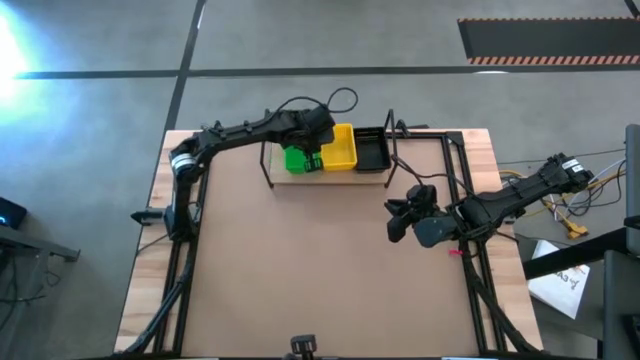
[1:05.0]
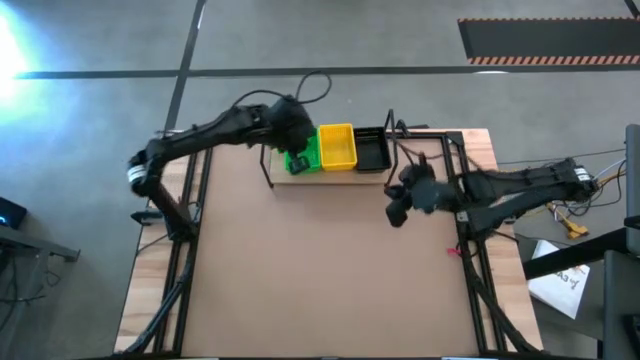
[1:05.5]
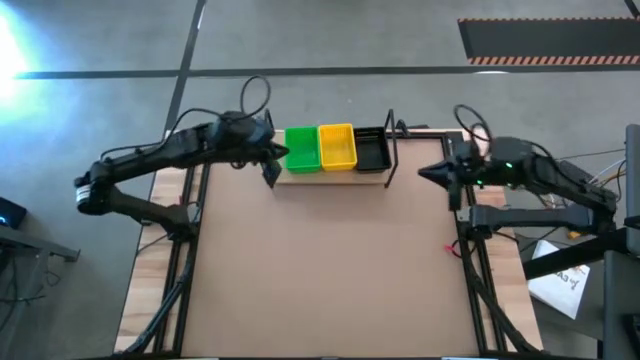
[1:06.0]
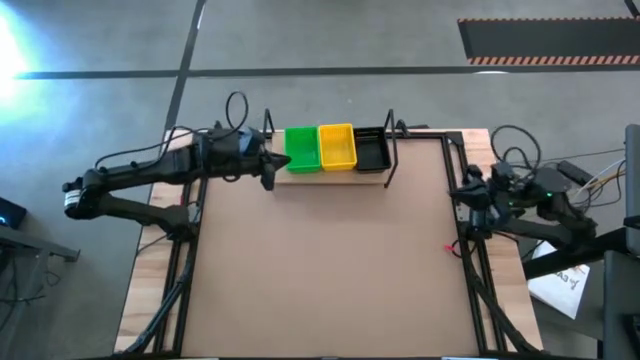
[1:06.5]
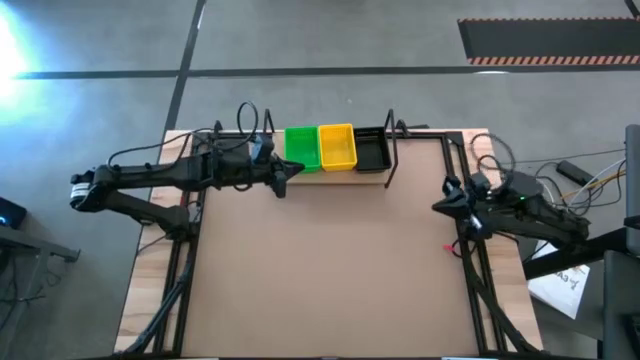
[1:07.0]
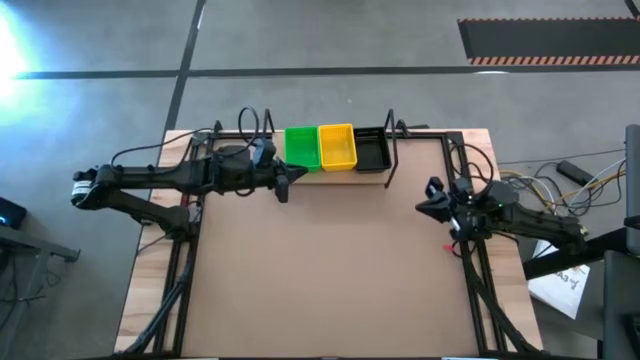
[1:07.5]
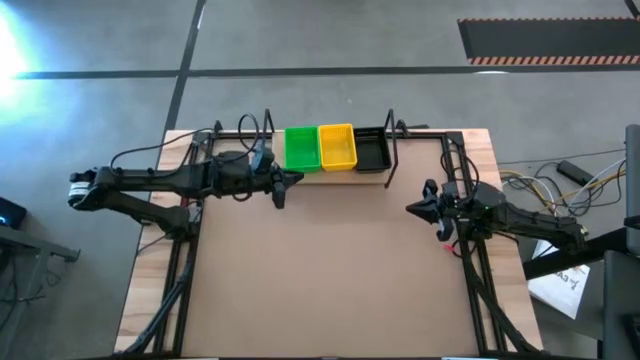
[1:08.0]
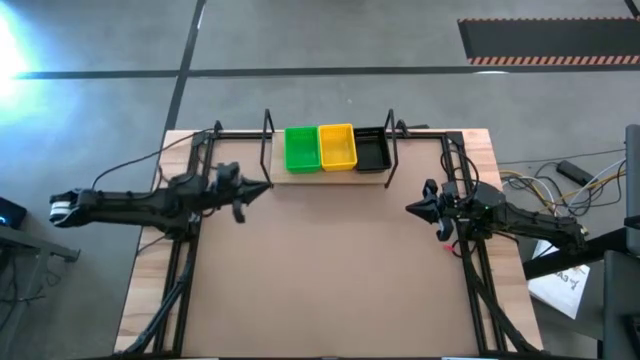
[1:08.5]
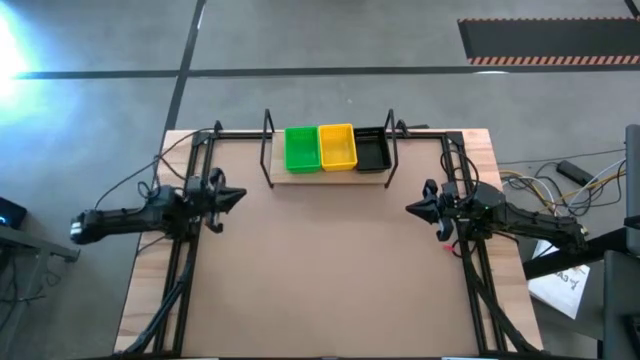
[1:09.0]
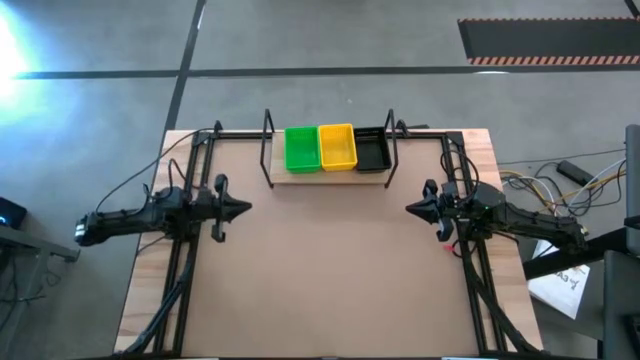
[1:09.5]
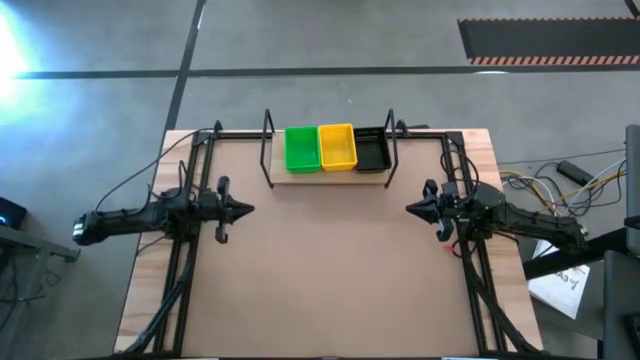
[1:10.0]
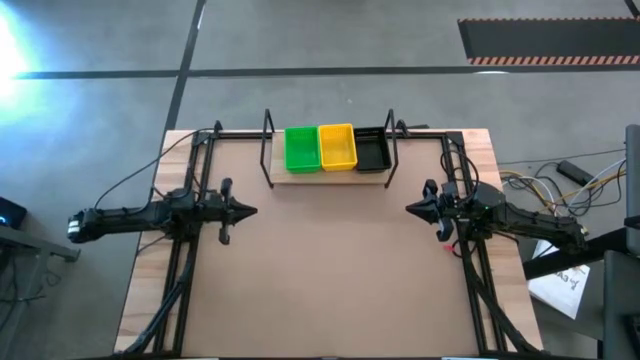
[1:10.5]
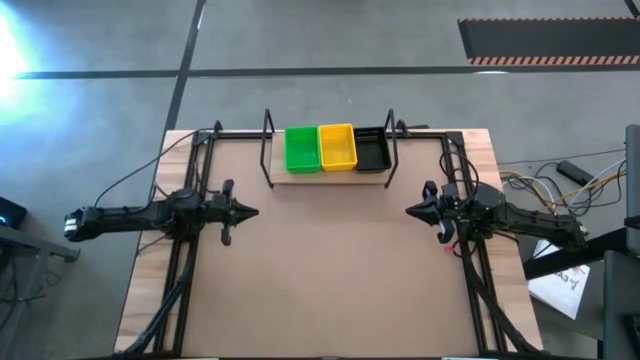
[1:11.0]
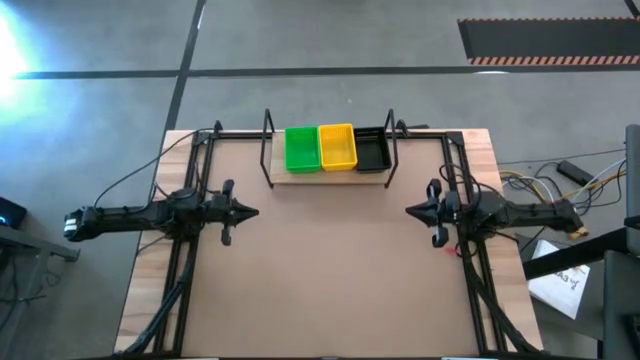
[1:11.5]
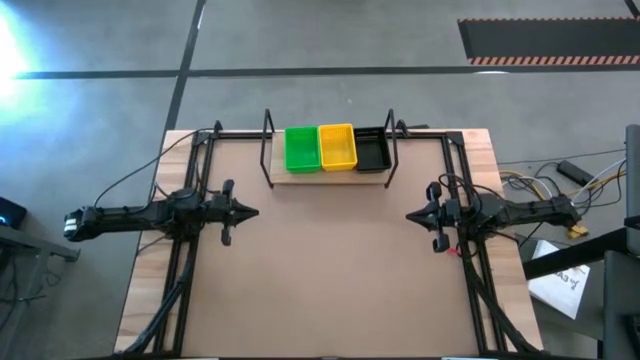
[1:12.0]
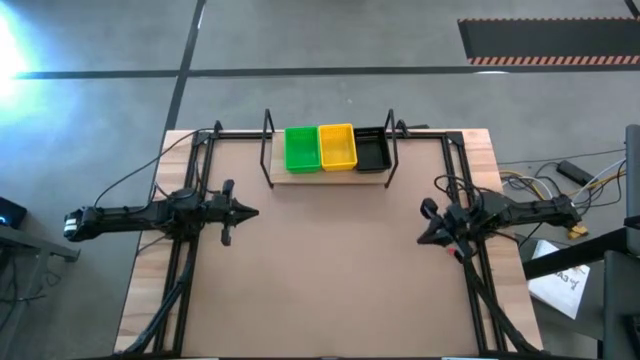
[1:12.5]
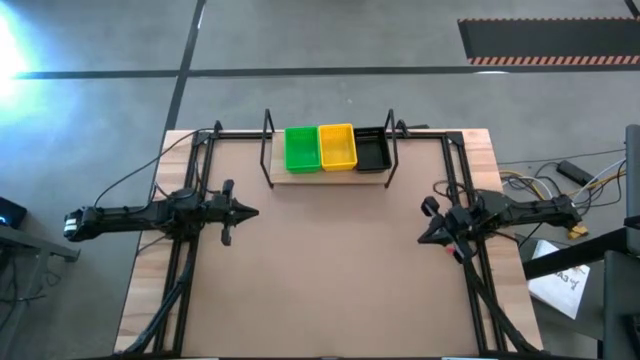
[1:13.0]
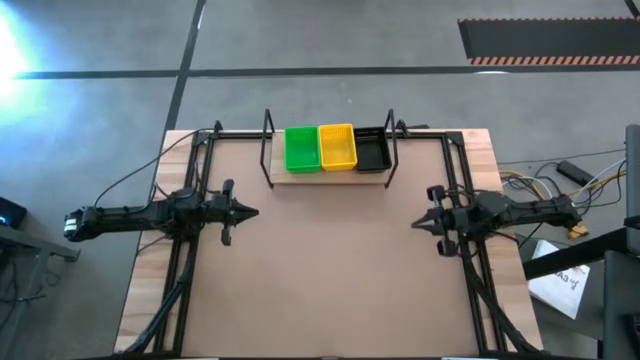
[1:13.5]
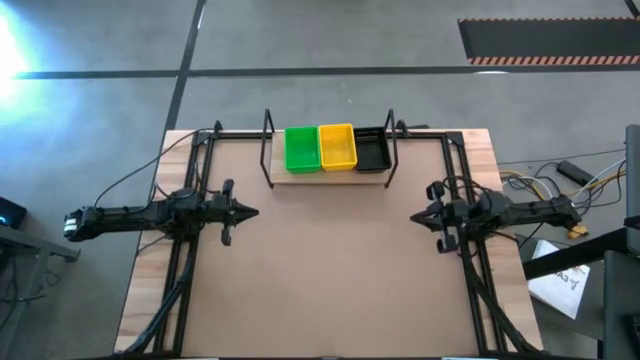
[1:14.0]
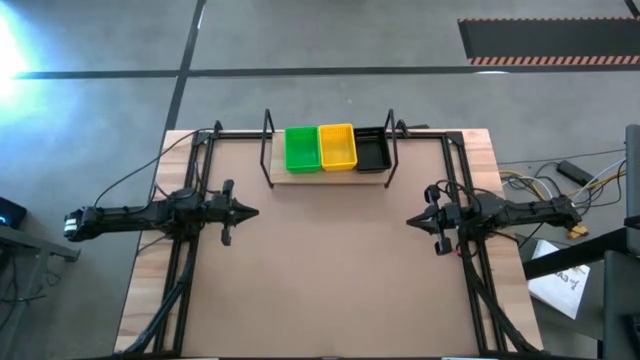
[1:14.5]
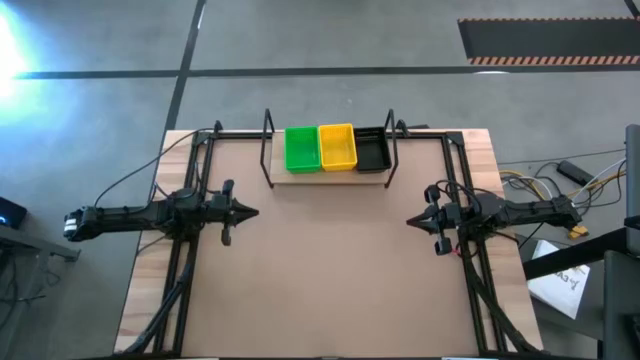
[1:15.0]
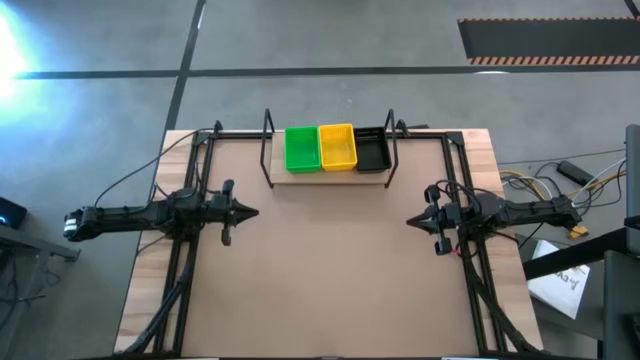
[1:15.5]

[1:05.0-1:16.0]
Task: Stack baskets on shelf by color
Return to Home Position

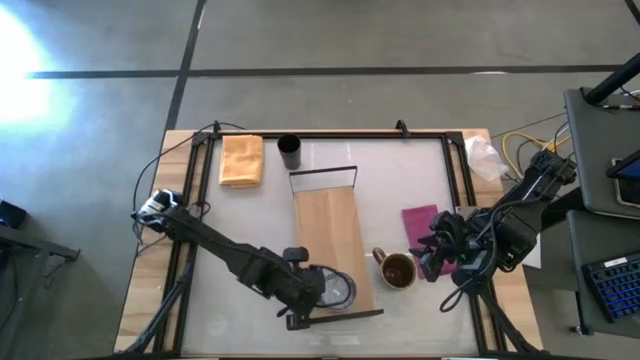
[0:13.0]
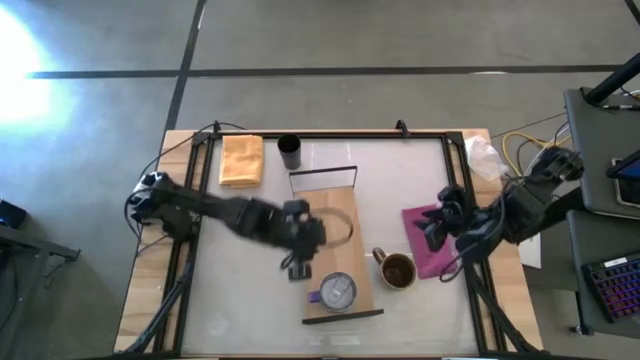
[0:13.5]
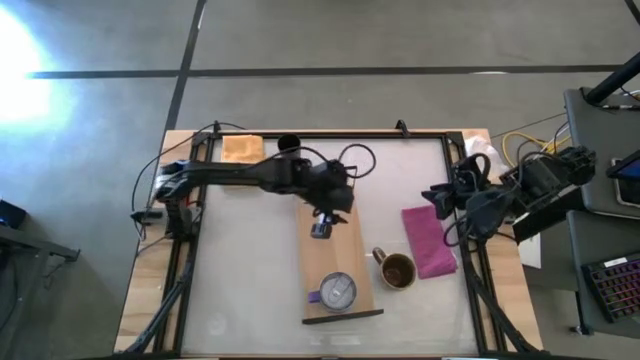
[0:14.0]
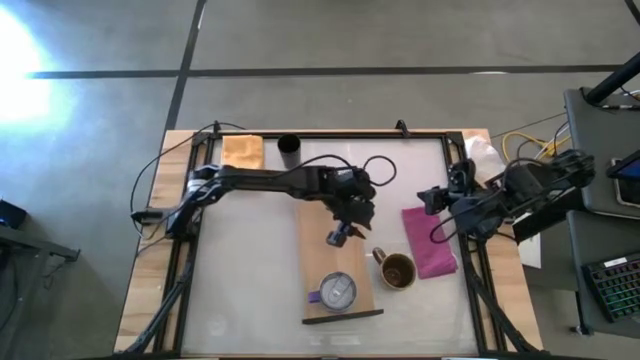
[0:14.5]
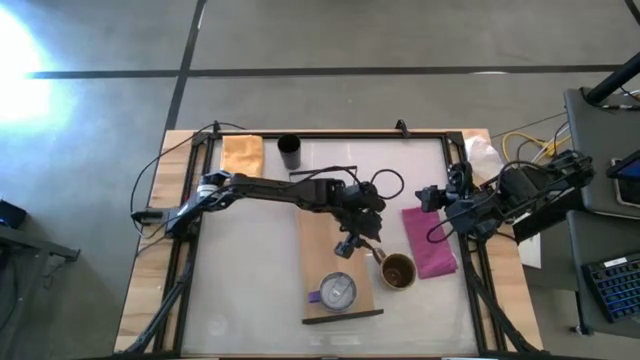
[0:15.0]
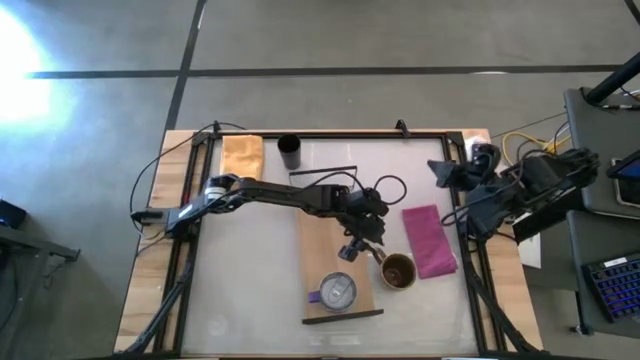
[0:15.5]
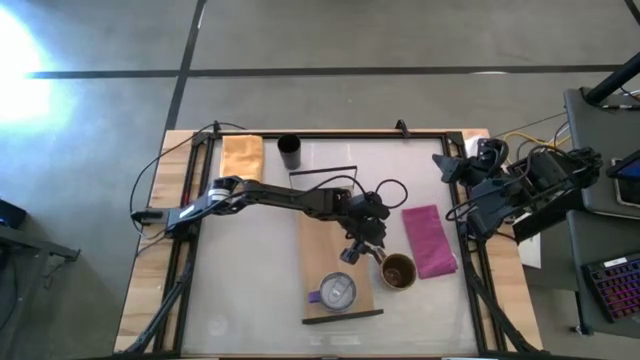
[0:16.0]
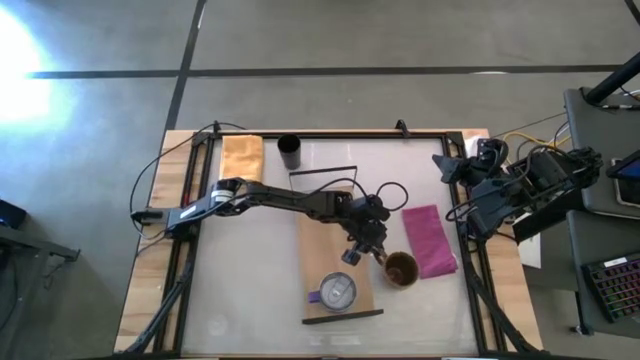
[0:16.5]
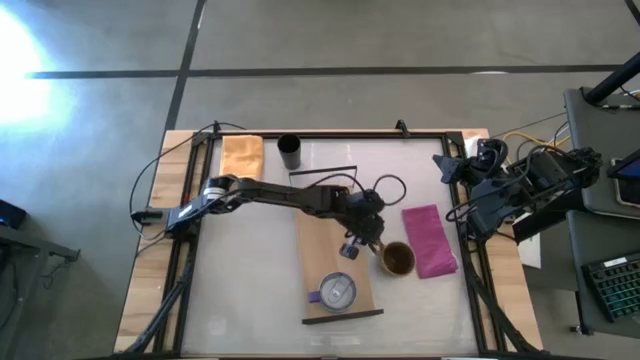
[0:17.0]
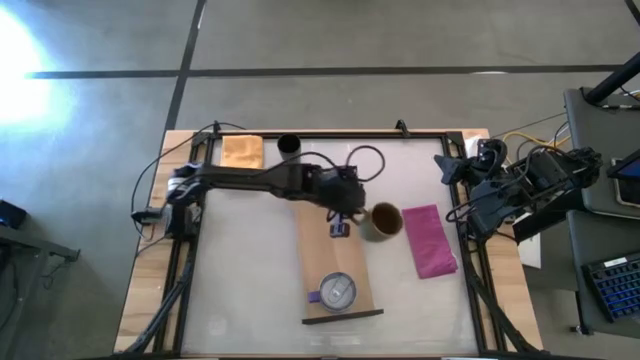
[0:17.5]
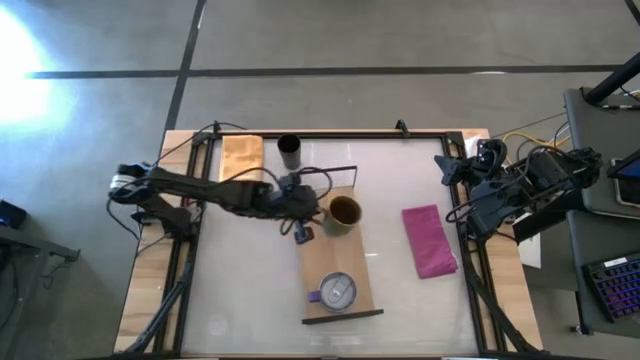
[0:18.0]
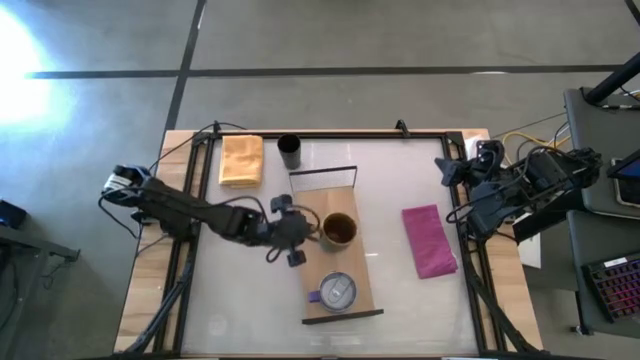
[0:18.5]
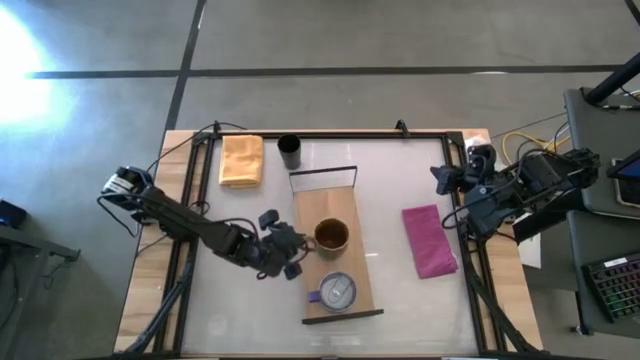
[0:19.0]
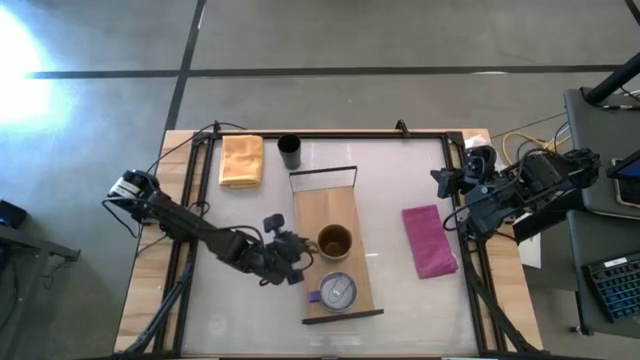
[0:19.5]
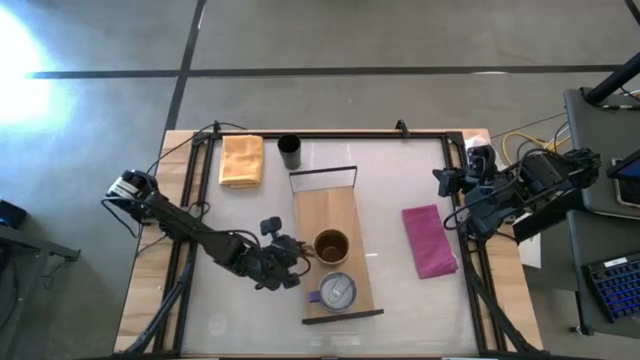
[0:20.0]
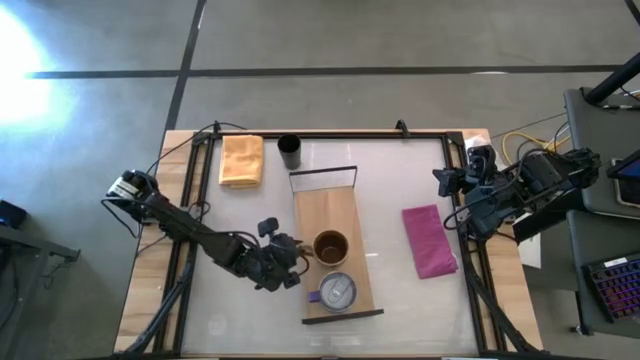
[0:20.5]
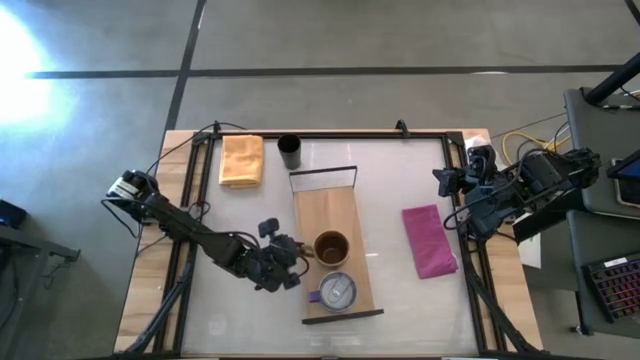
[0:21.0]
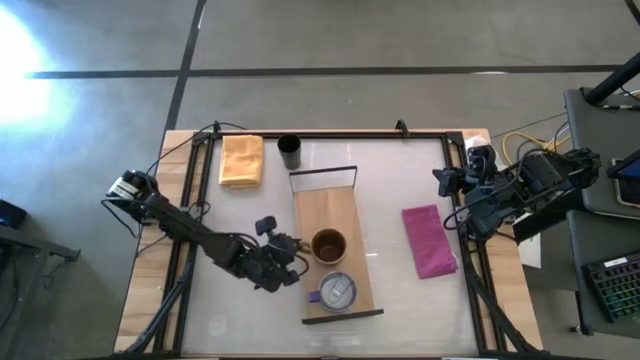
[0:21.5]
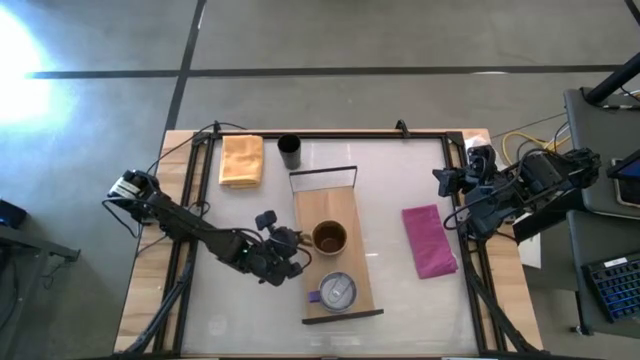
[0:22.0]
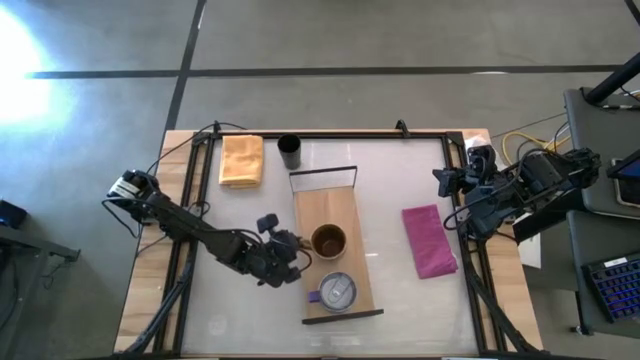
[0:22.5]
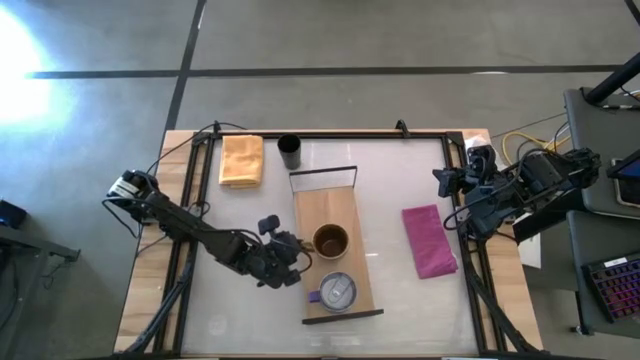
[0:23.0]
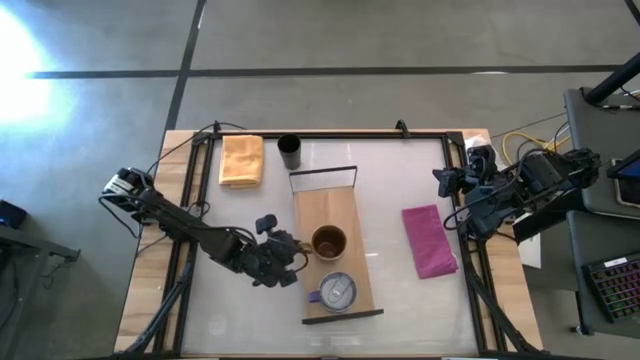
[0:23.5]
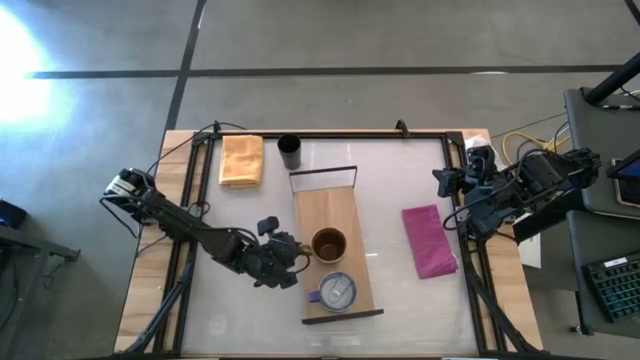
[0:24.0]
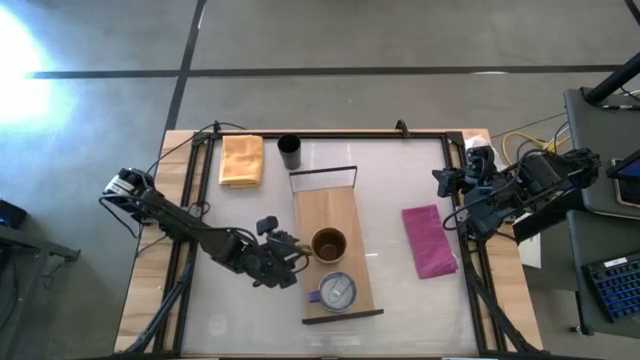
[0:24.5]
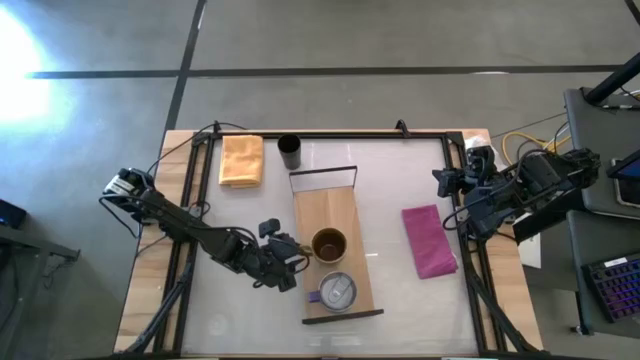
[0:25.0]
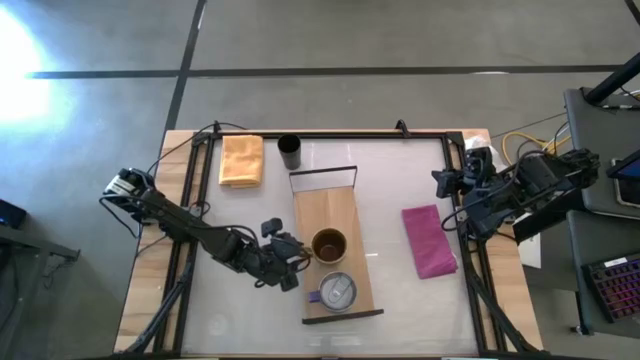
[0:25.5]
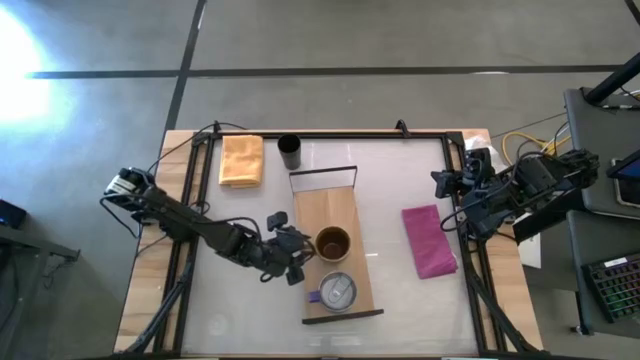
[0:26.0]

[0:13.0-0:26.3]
Task: Stack small to large cups/mugs on shelf
Put the green mug on the shelf
